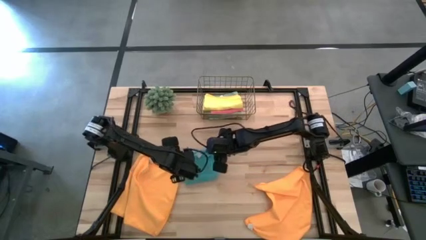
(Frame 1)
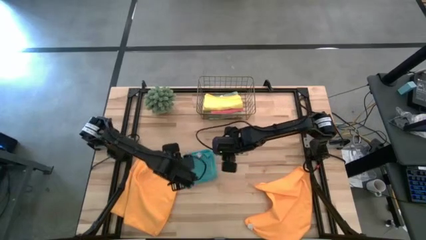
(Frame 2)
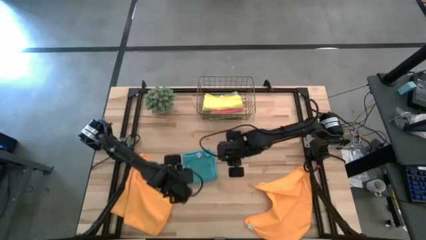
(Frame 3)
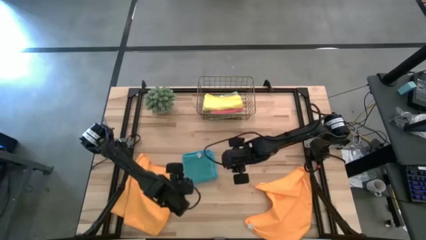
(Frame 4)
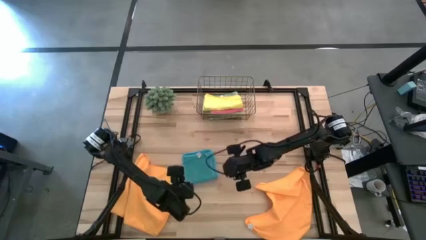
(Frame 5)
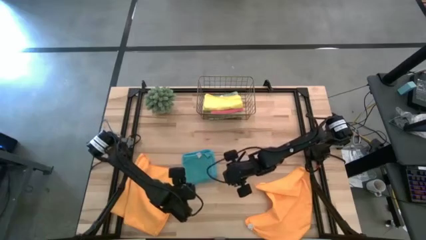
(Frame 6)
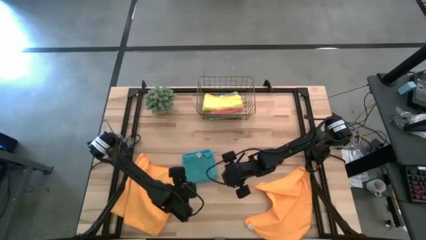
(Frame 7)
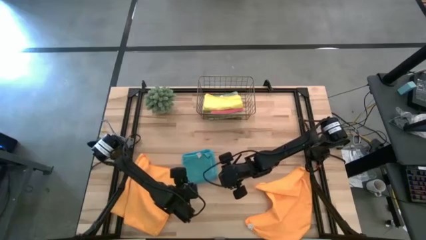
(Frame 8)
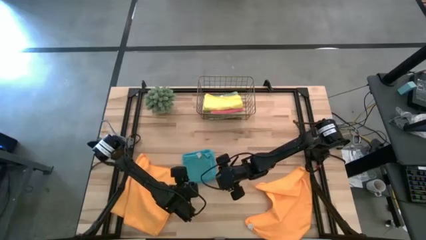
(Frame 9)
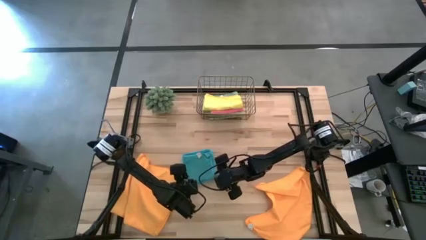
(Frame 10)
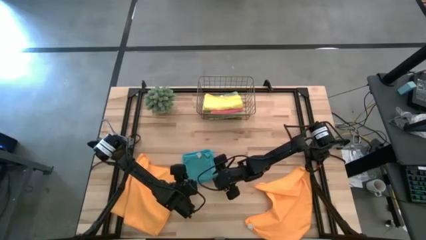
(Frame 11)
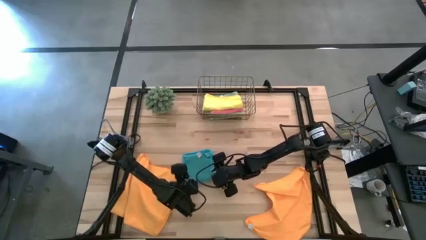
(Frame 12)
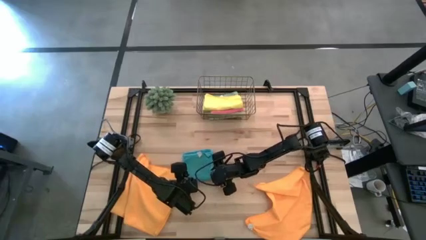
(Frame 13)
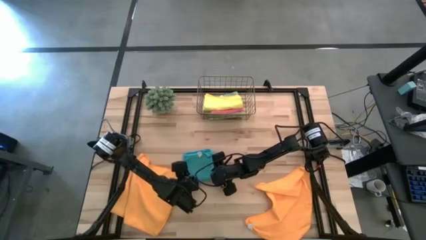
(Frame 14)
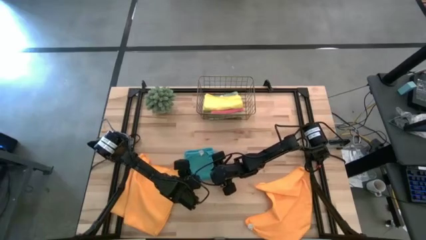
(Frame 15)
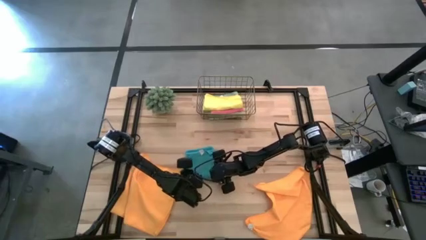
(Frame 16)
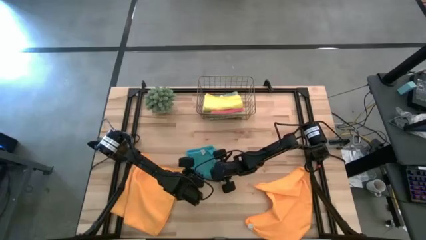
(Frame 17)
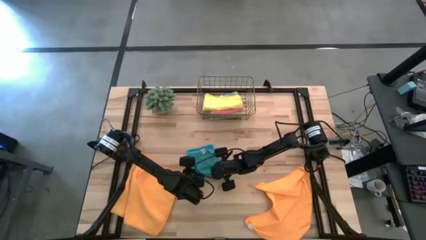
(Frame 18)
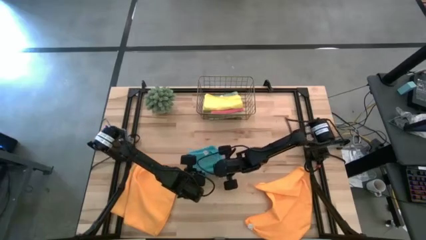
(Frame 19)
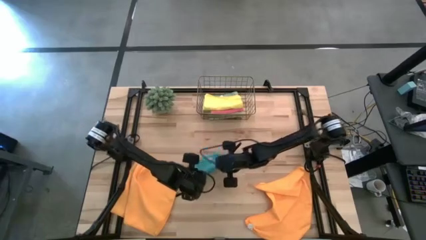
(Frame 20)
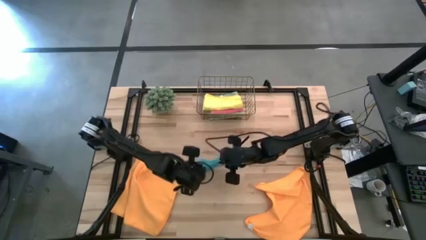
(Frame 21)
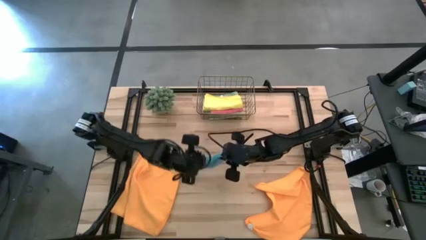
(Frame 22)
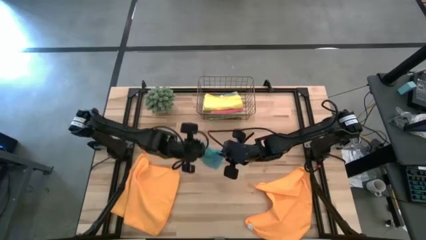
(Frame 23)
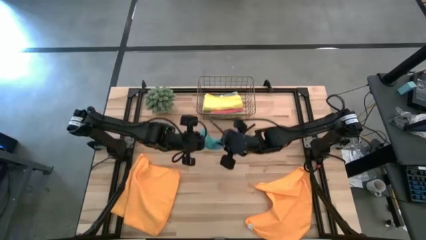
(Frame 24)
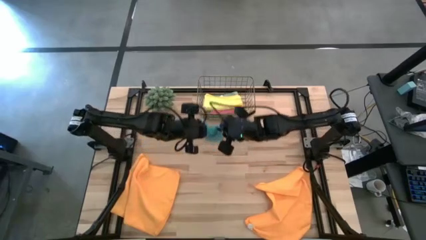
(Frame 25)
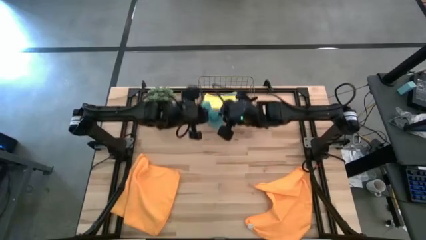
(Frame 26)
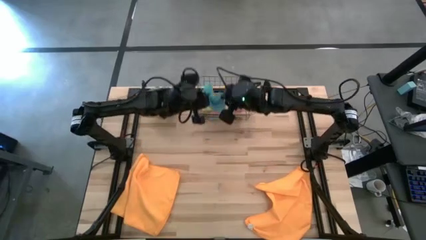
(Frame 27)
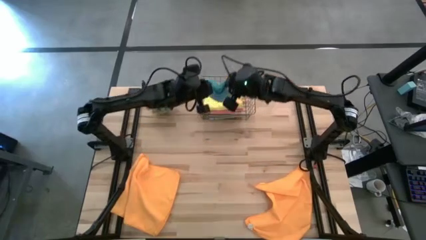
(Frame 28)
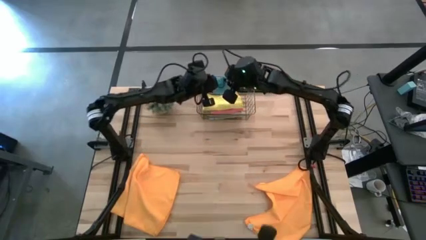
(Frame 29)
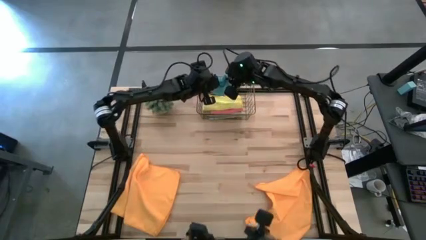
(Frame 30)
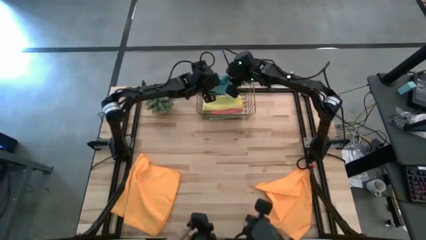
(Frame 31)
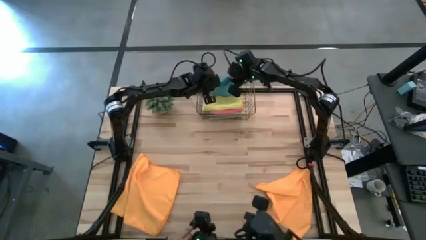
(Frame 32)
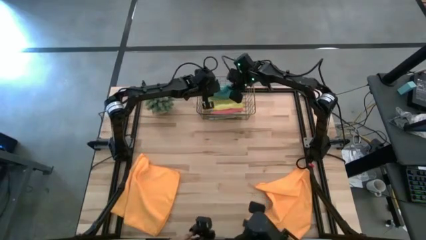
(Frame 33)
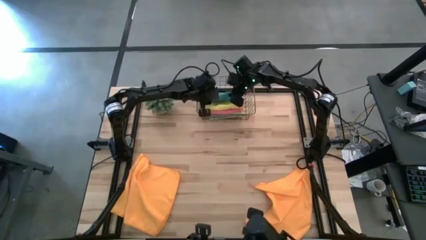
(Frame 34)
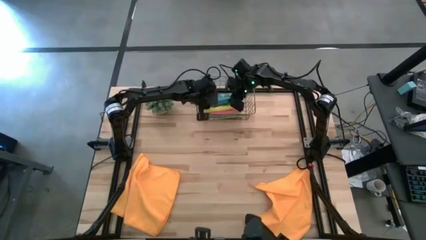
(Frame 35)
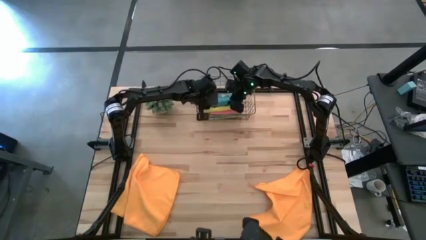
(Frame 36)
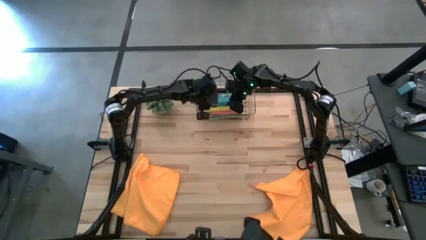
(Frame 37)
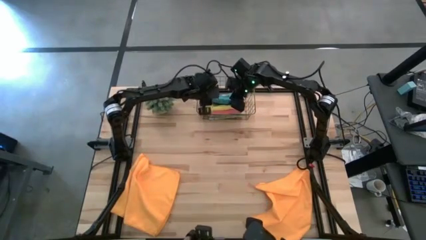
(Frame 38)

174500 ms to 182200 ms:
Task: Fold microfiber towels
Put the blue folded towel into the wire basket

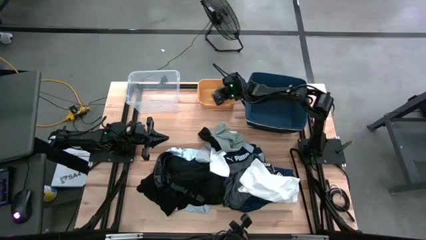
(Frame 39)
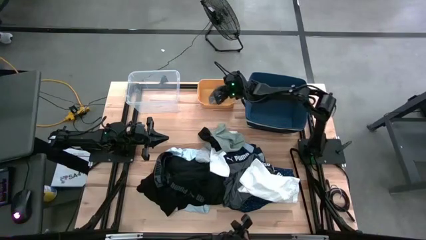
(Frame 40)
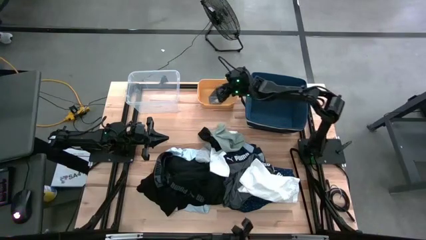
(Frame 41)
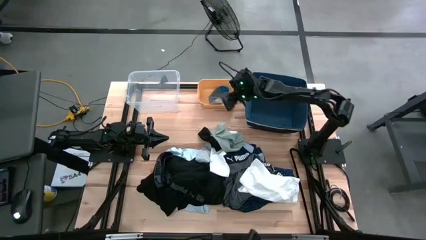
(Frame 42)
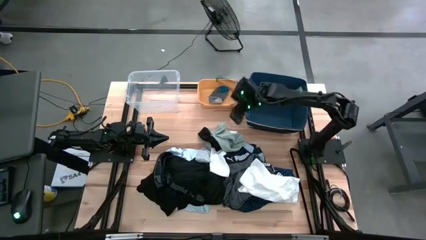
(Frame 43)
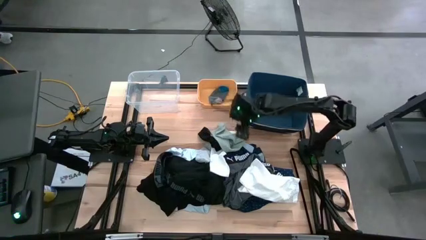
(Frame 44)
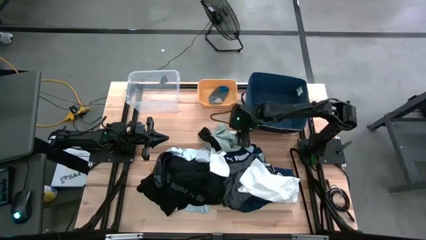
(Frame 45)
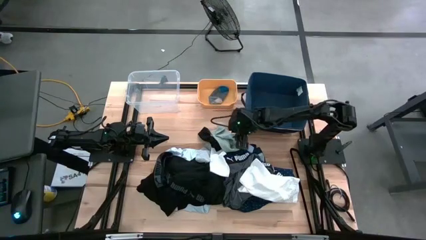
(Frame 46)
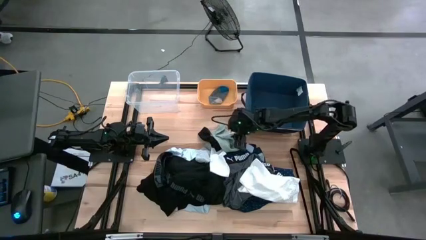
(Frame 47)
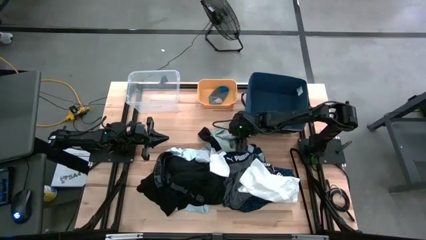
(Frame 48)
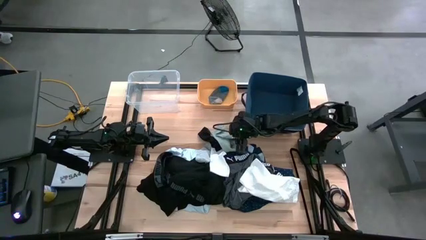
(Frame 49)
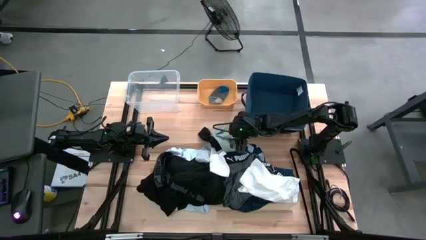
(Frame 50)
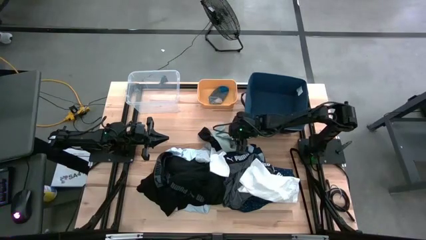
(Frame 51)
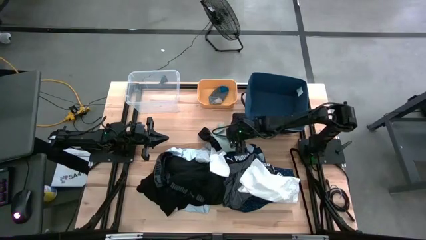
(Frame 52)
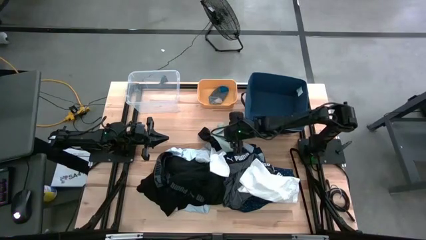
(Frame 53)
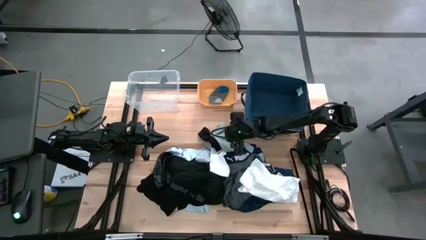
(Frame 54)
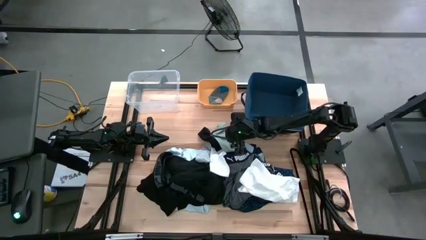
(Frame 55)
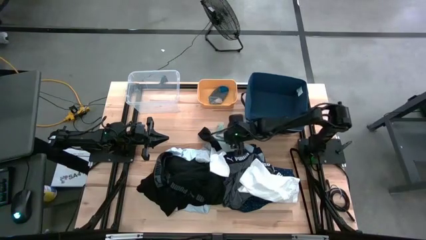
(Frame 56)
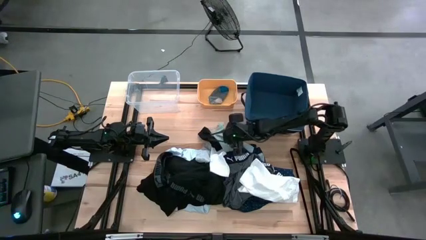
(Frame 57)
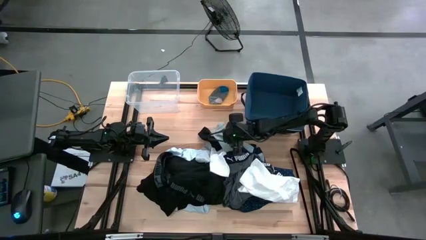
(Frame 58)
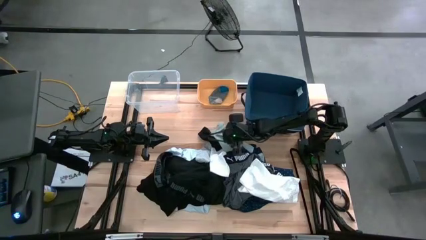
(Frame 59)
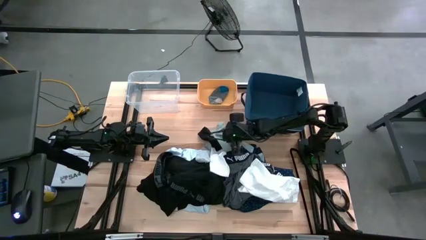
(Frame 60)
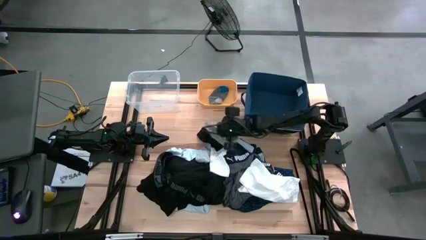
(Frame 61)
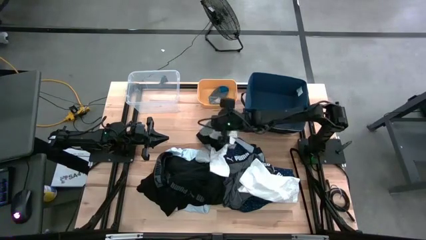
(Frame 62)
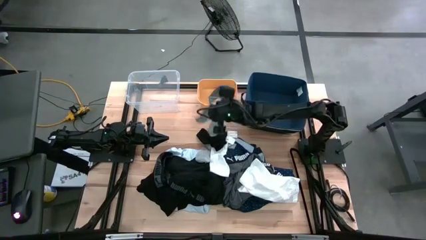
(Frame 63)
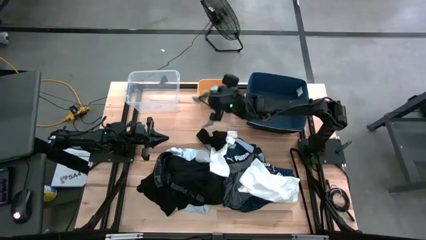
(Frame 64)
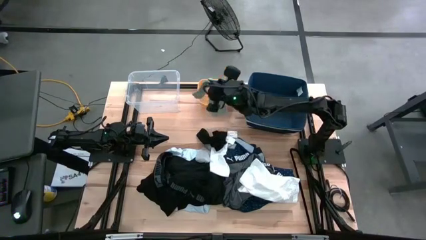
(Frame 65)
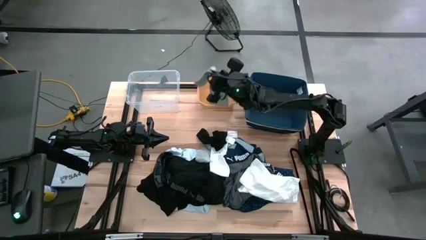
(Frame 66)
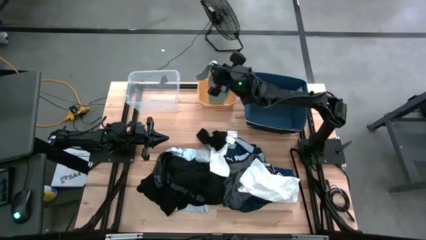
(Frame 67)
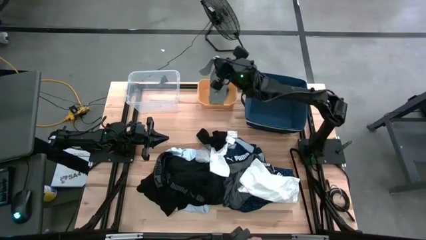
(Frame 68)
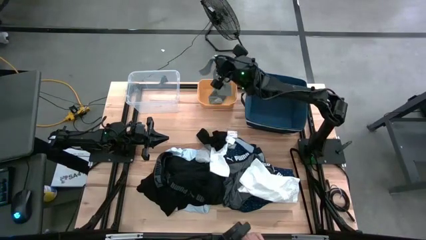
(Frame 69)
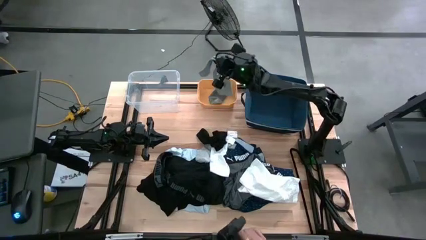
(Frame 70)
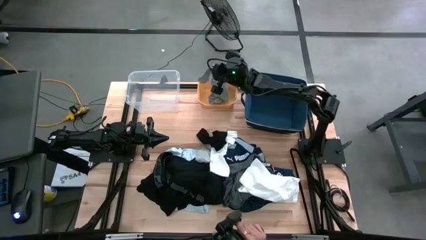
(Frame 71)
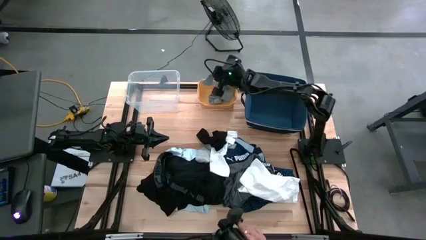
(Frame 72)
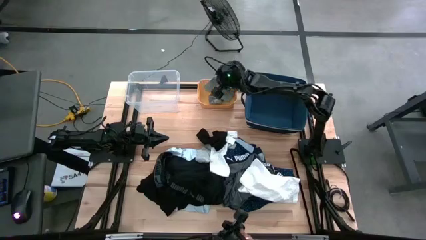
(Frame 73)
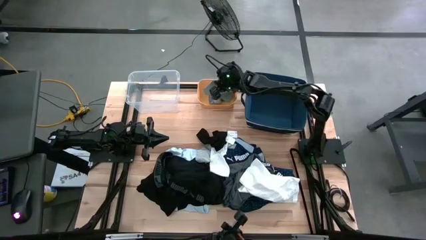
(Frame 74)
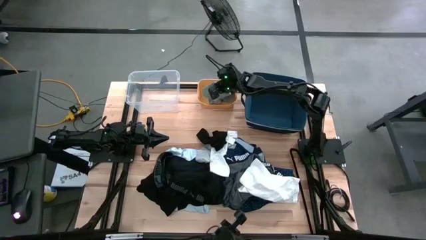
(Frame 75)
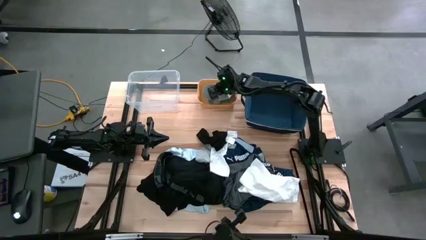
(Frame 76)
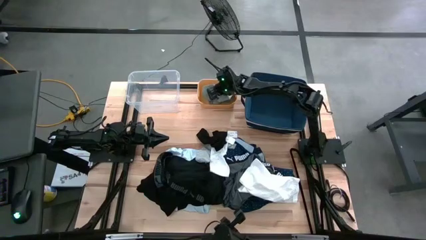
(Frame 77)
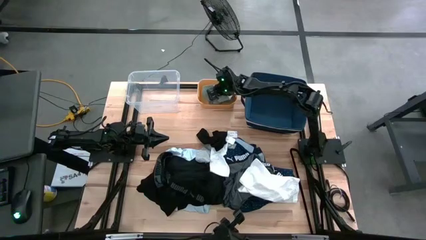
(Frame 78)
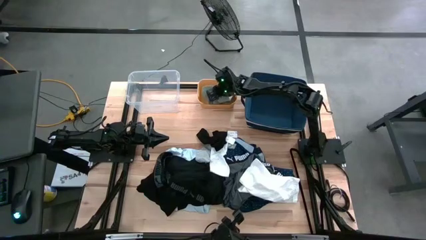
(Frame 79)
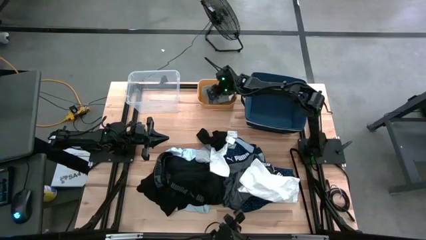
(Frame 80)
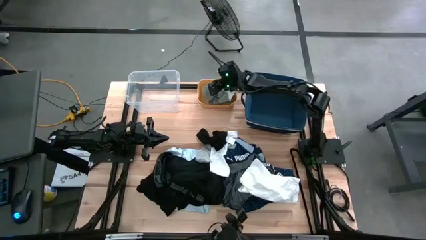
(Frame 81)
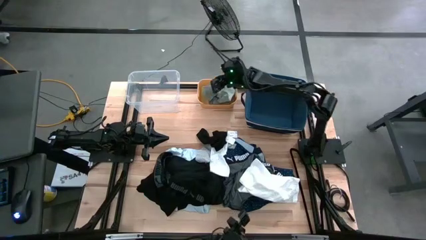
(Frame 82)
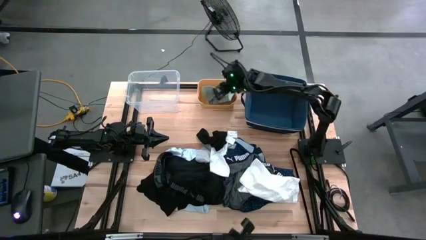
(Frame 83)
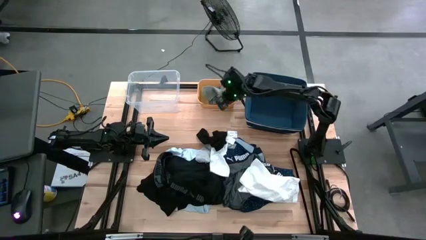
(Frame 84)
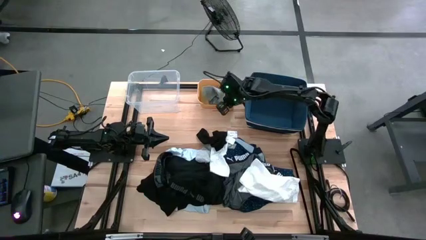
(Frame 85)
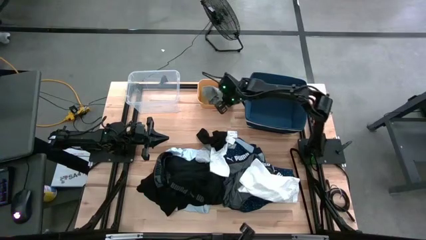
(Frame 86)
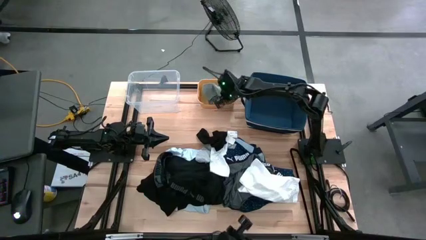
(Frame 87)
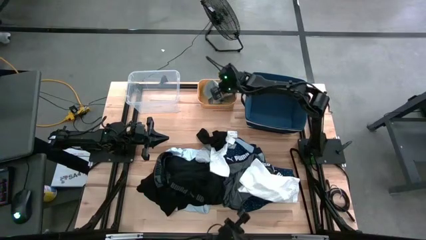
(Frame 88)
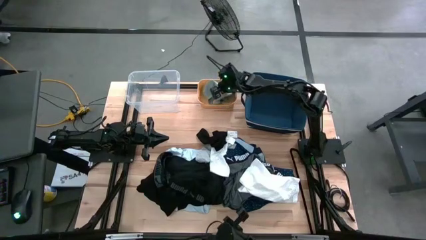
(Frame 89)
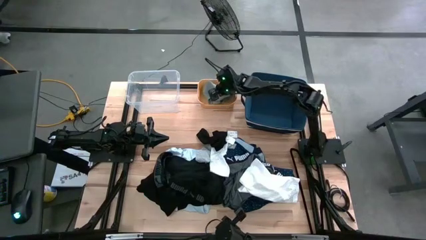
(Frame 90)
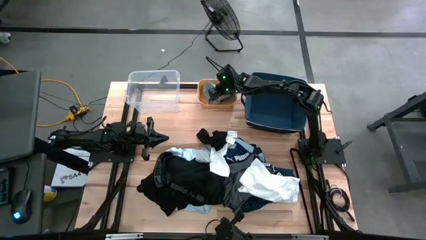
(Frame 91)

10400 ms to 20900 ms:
Task: Pick & Place Cloths
Put the gray sock into the yellow bin
